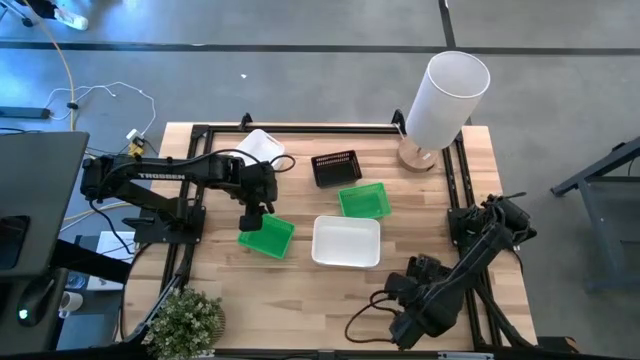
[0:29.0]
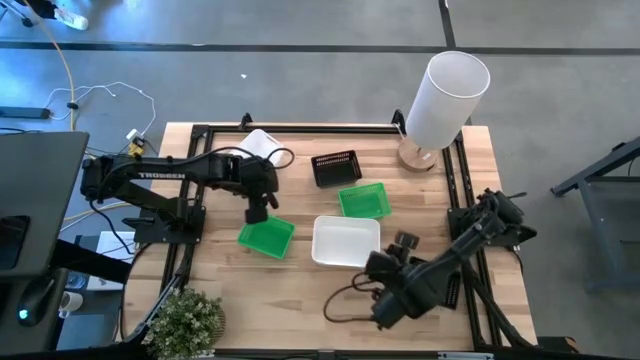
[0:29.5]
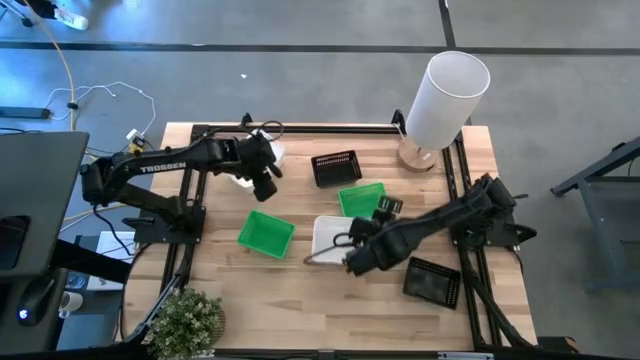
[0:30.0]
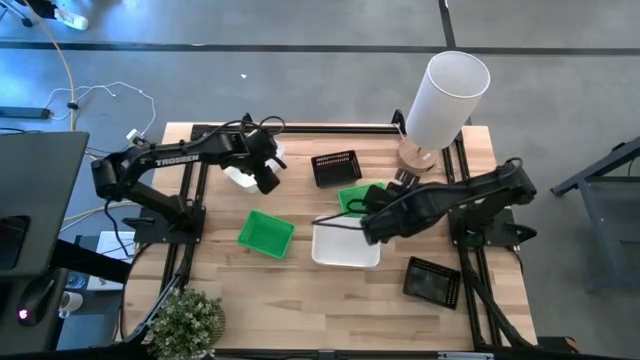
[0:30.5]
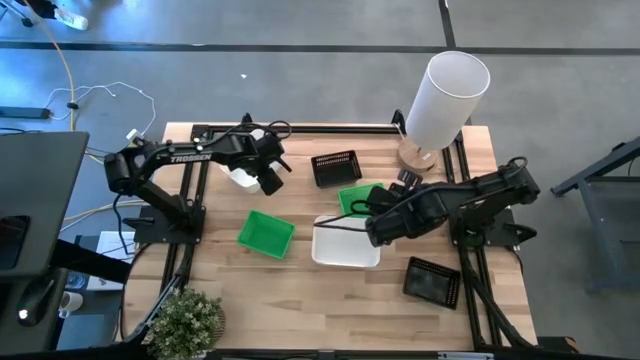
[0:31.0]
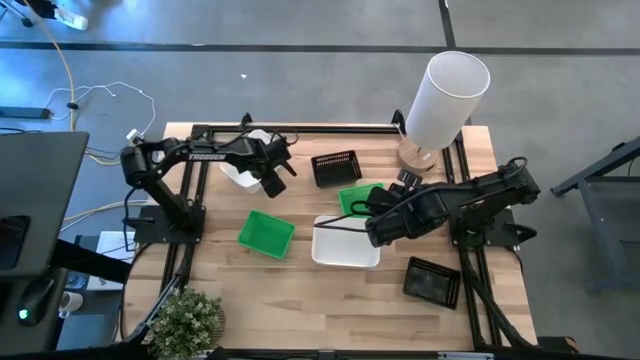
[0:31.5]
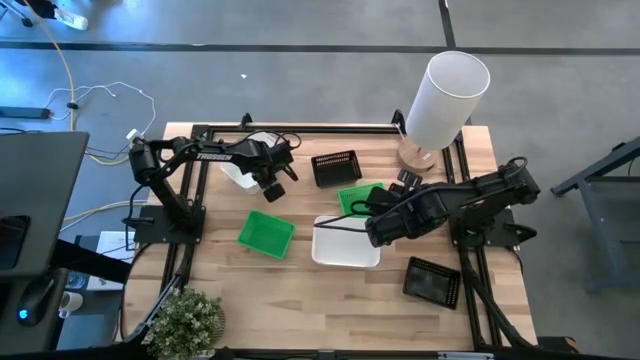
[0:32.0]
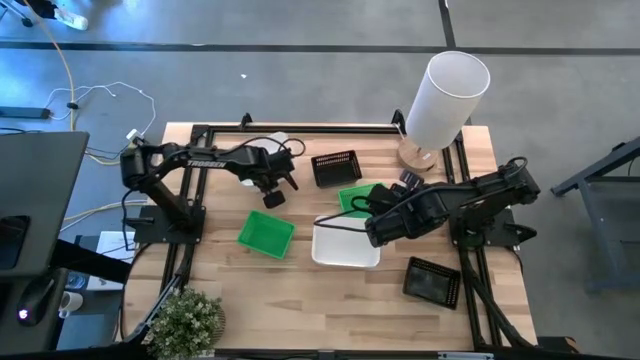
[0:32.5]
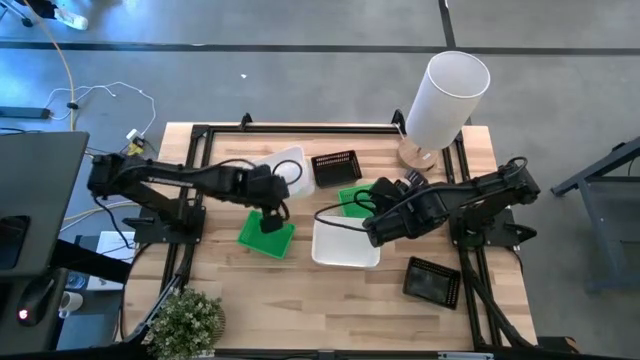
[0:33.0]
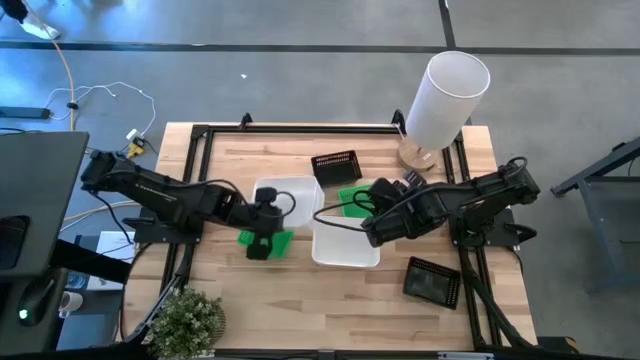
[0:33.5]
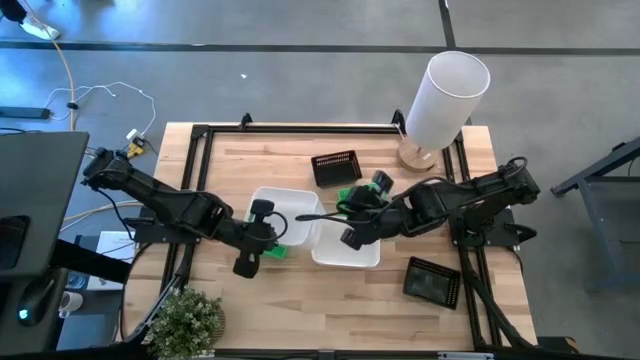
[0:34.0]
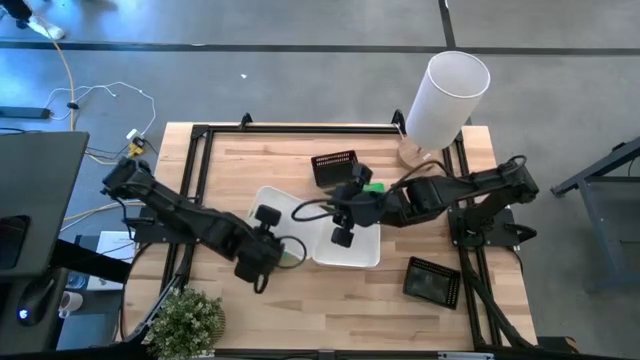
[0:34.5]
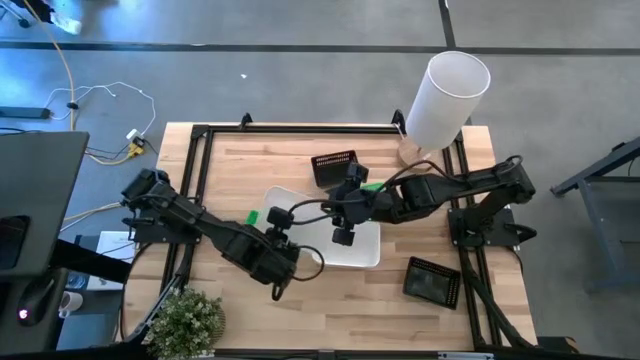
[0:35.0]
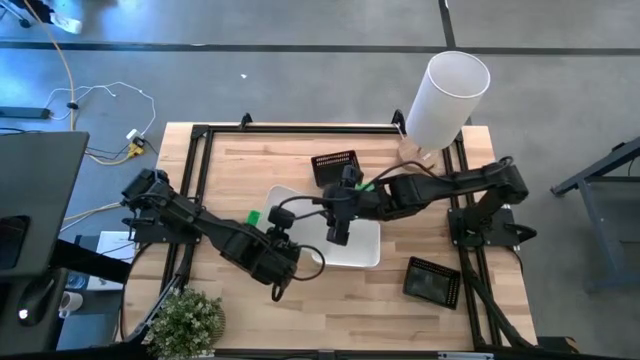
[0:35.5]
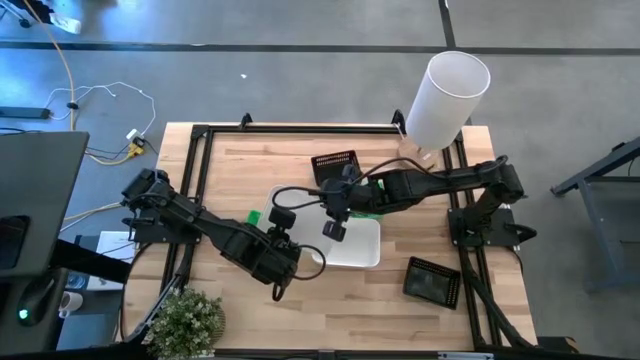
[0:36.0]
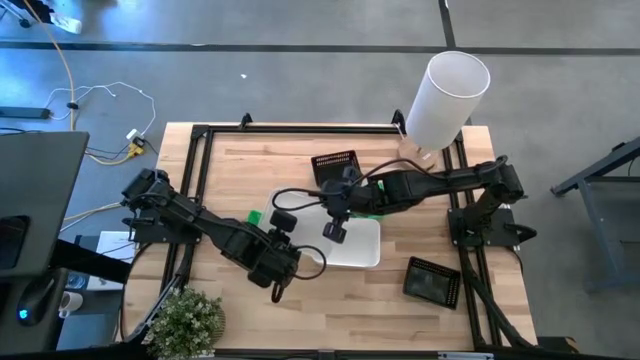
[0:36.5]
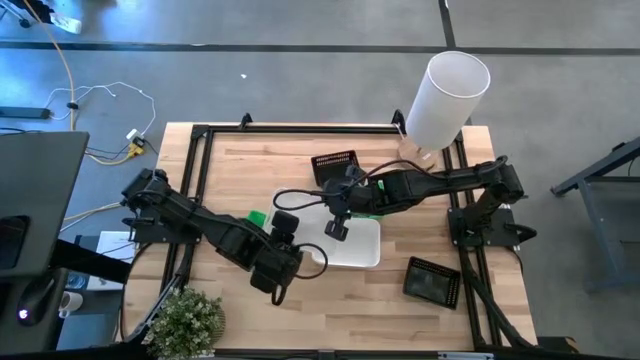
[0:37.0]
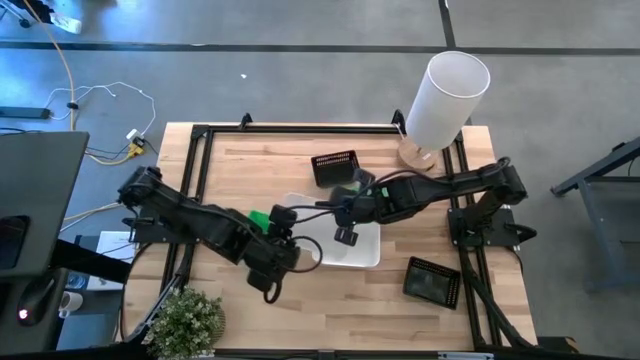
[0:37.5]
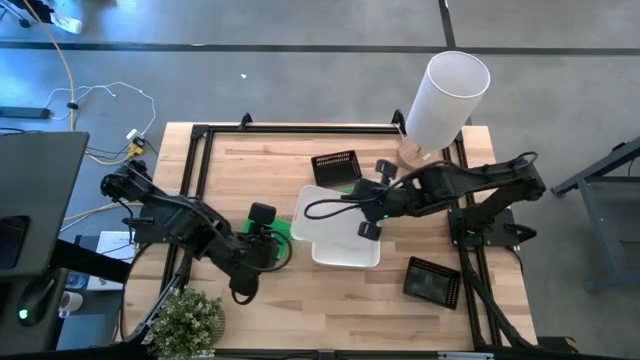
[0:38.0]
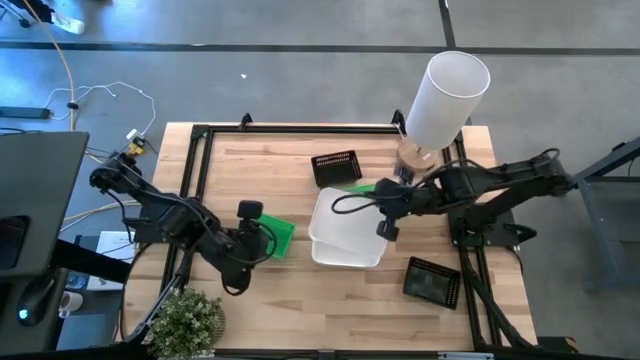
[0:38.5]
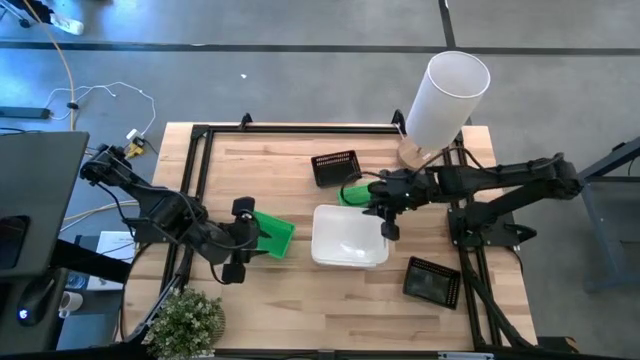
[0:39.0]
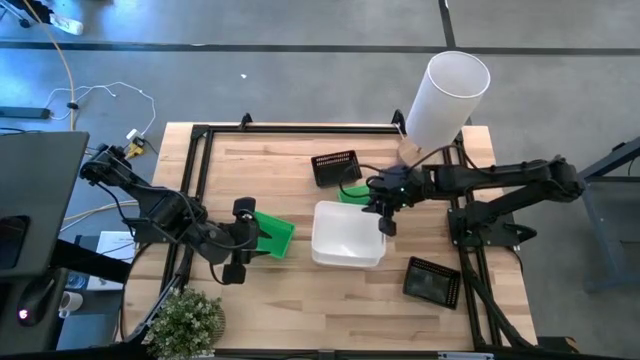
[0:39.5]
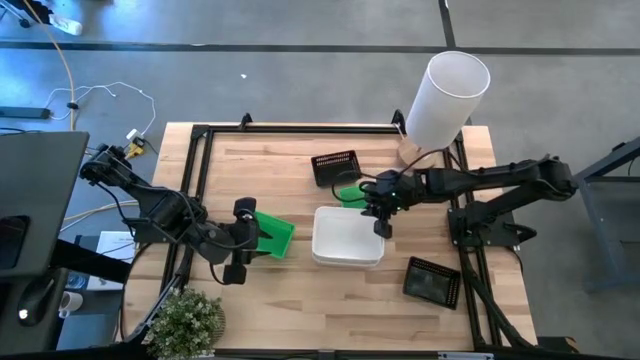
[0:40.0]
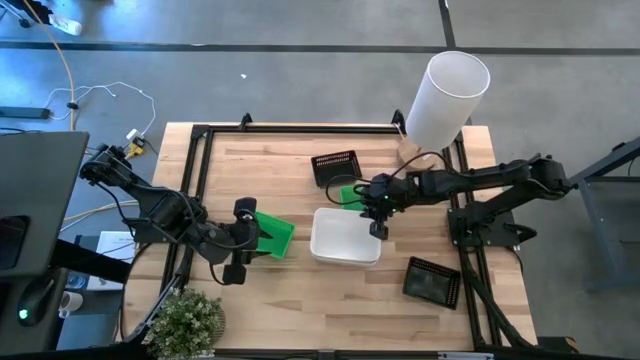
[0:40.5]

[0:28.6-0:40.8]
Stack the top white bin on the white bin

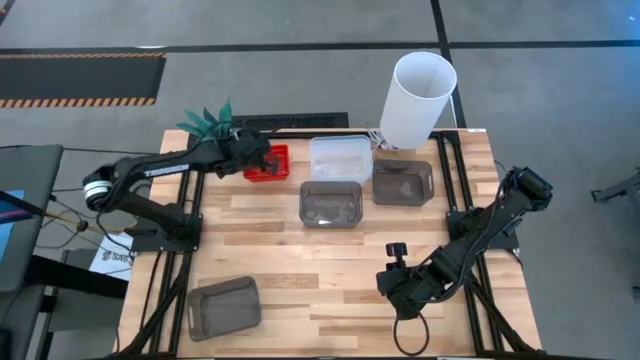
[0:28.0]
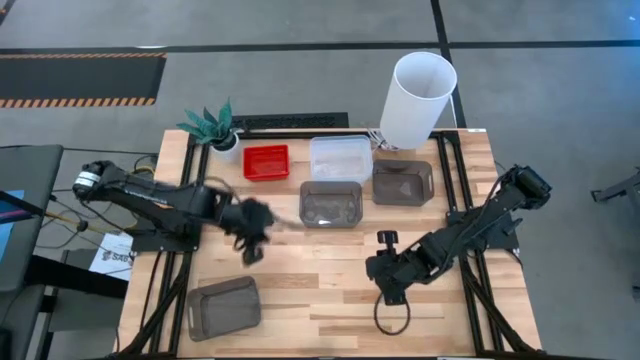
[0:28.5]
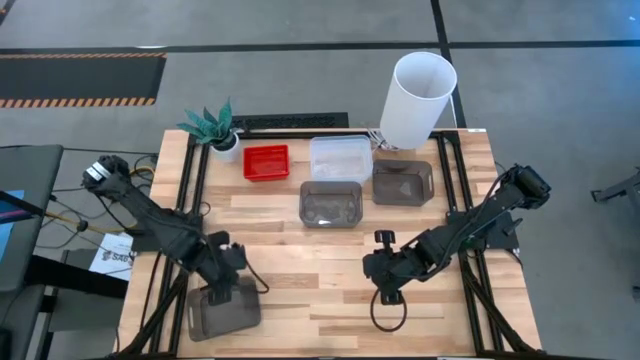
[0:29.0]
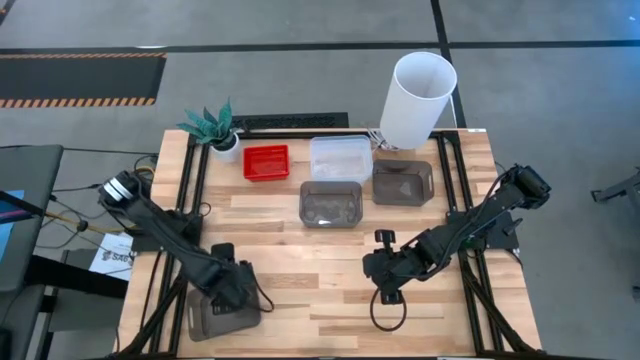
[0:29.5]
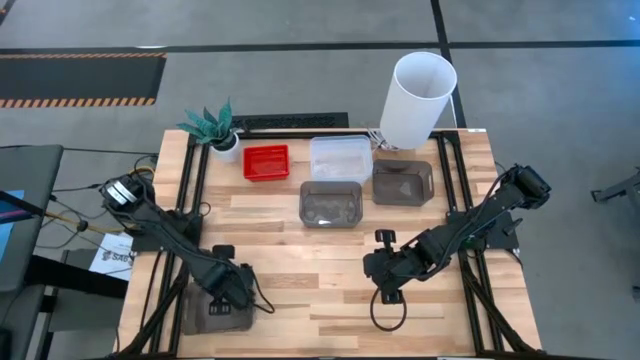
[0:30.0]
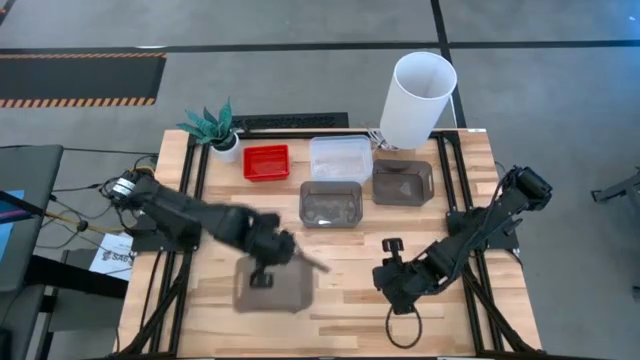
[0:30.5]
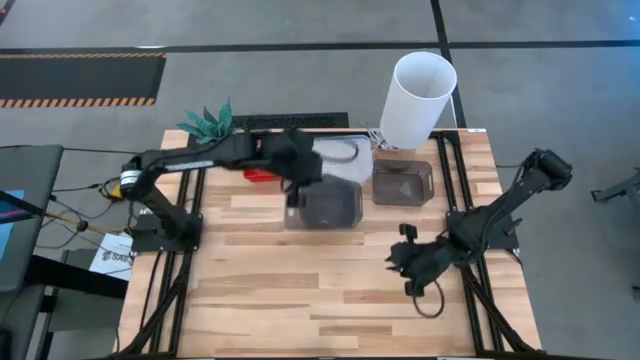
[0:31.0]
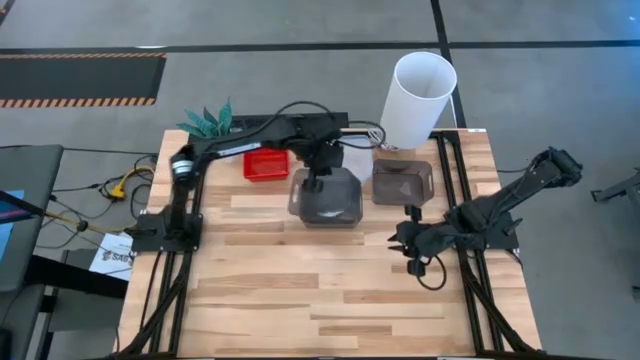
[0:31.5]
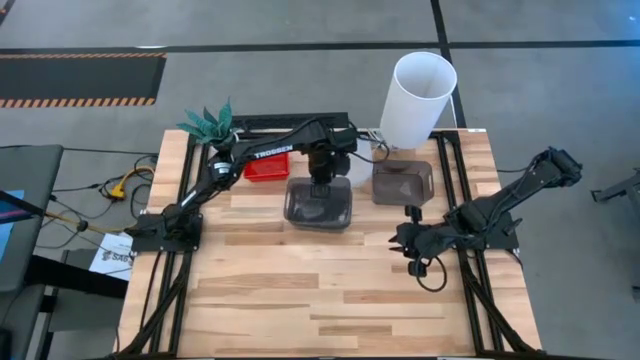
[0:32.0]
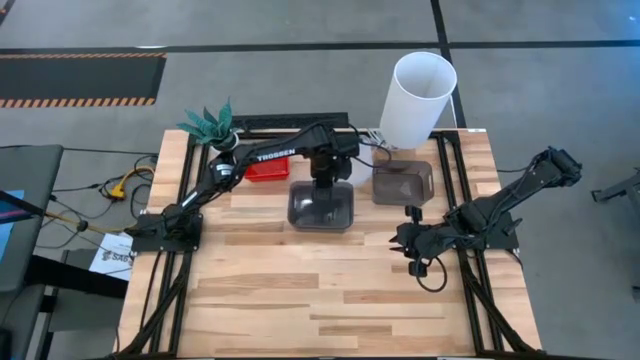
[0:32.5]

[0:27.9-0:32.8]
Stack the bottom black bin on top of the left black bin

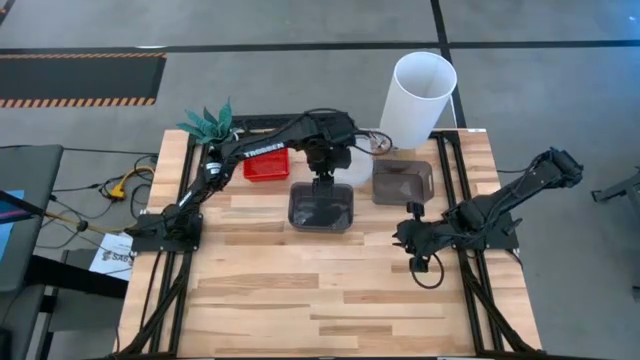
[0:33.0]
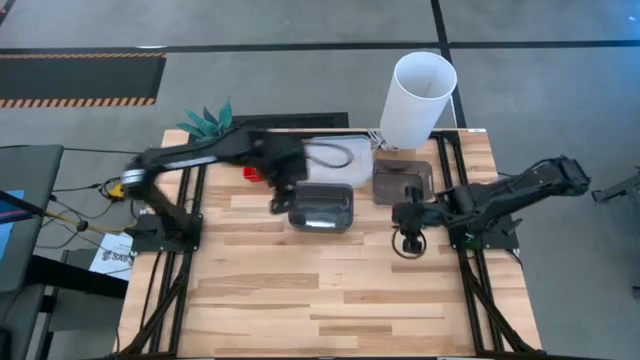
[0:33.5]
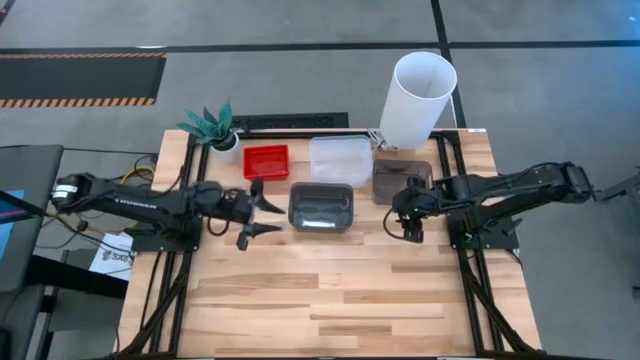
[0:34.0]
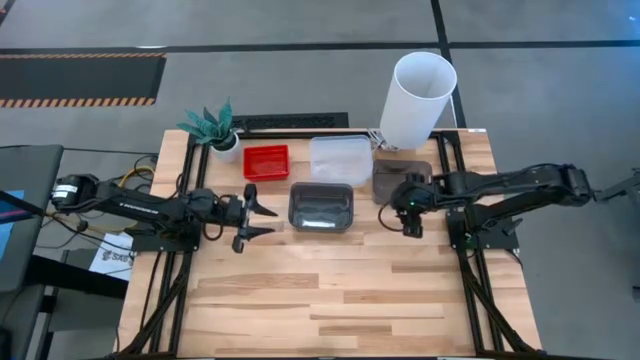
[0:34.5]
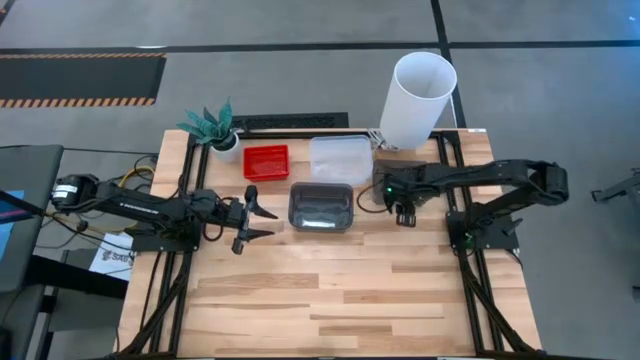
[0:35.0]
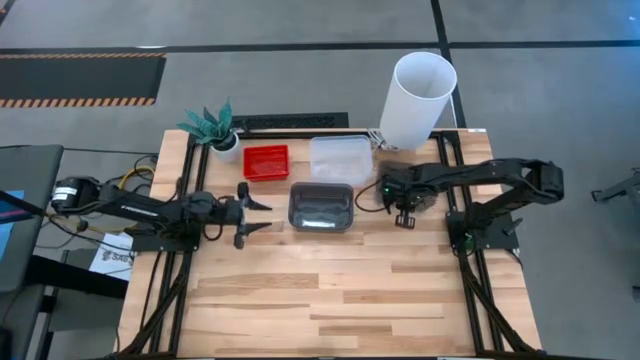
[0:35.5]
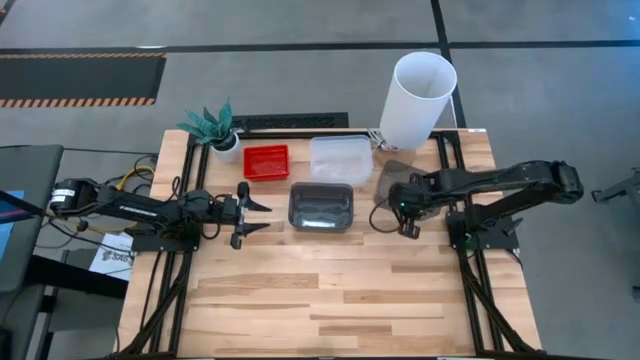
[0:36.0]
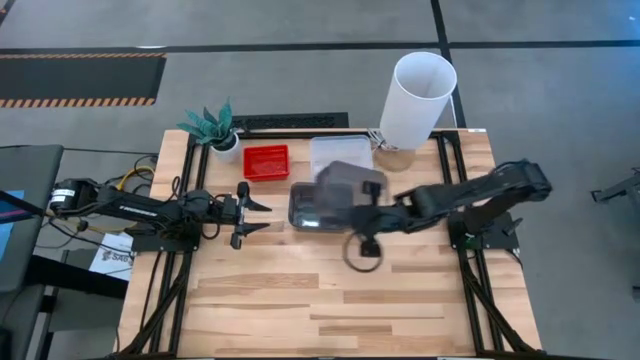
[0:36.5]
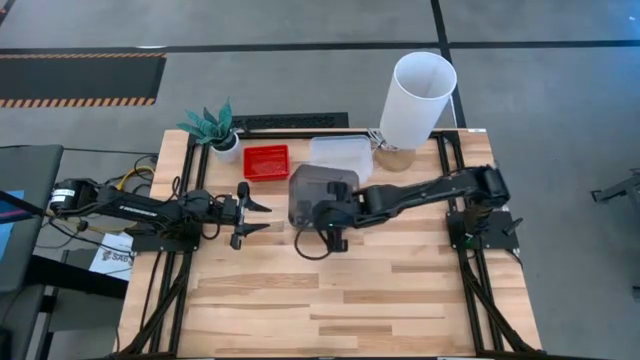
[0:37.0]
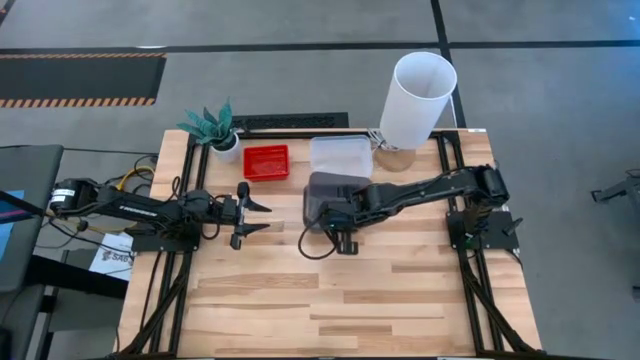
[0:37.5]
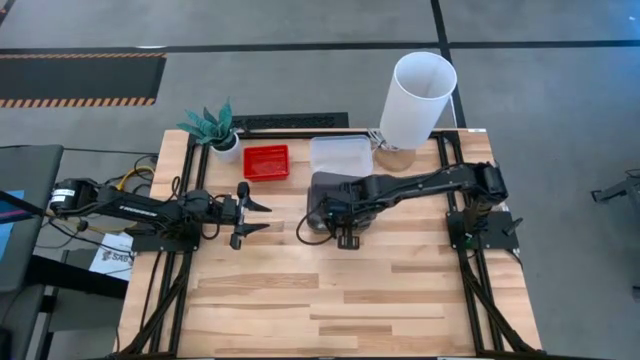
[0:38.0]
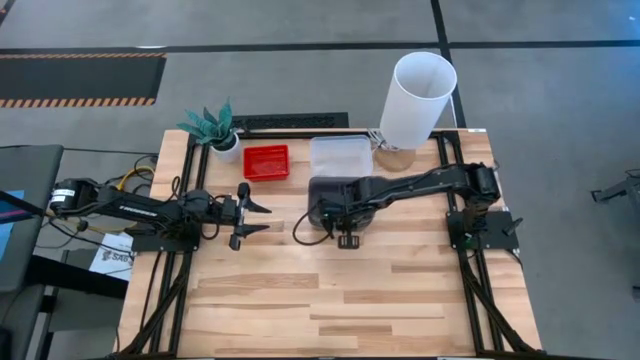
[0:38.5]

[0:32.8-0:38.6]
Stack the black bin on top of the black bins
